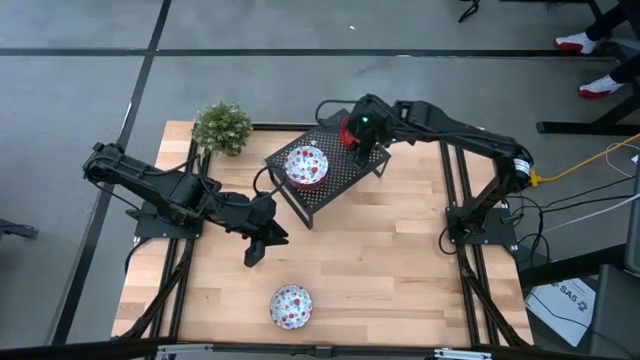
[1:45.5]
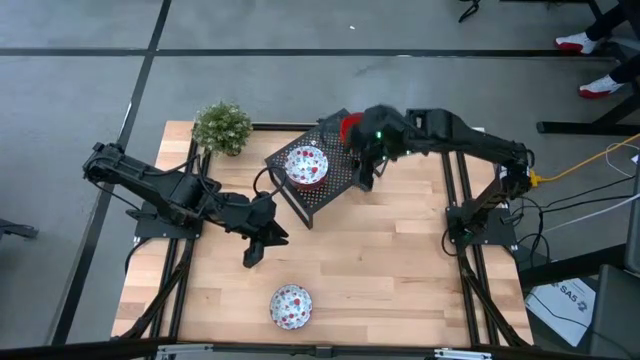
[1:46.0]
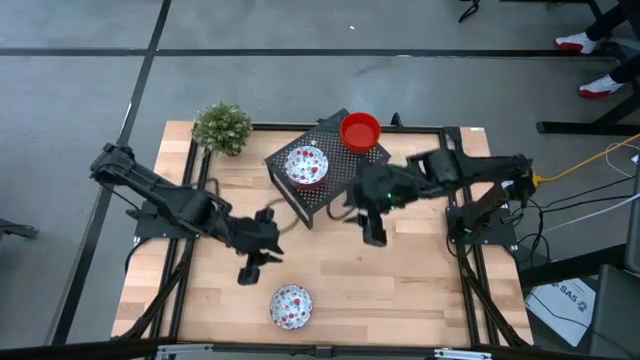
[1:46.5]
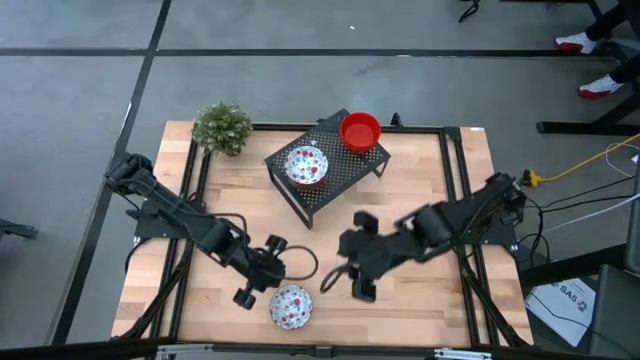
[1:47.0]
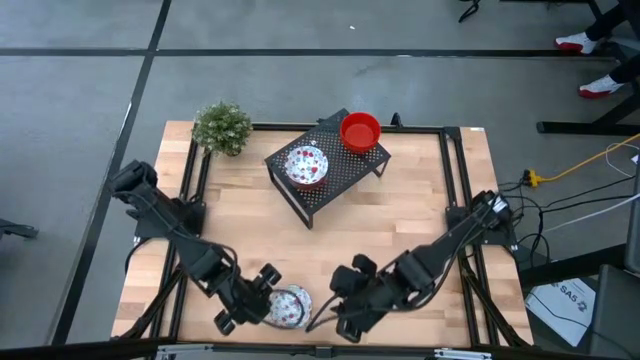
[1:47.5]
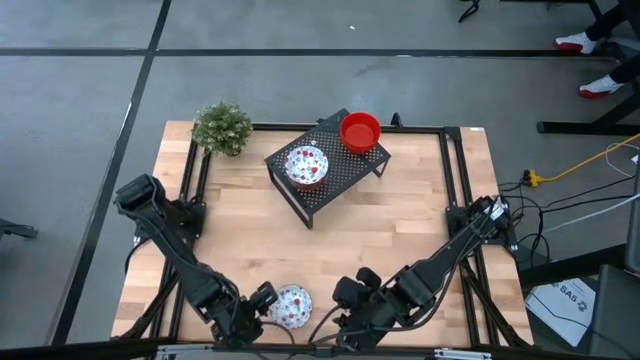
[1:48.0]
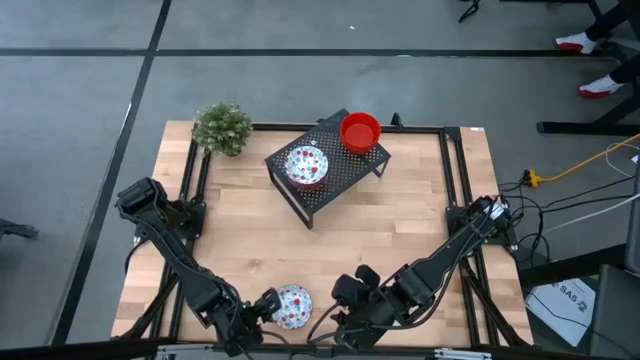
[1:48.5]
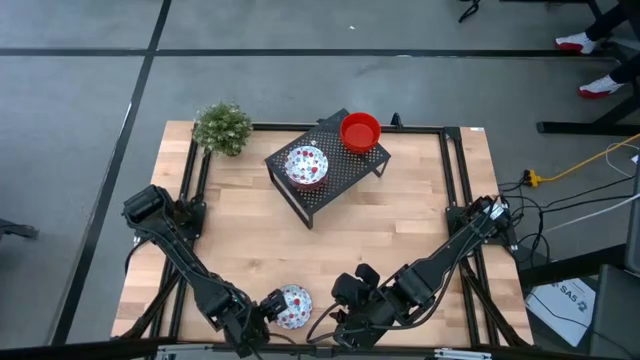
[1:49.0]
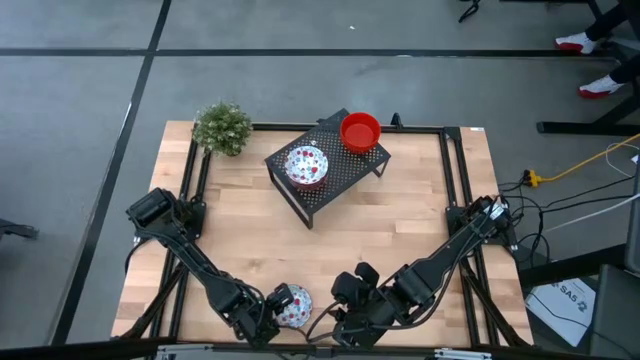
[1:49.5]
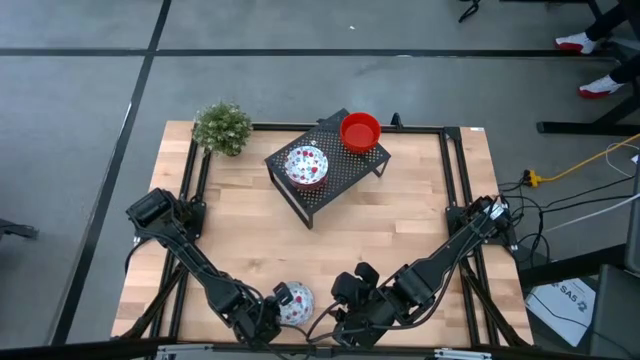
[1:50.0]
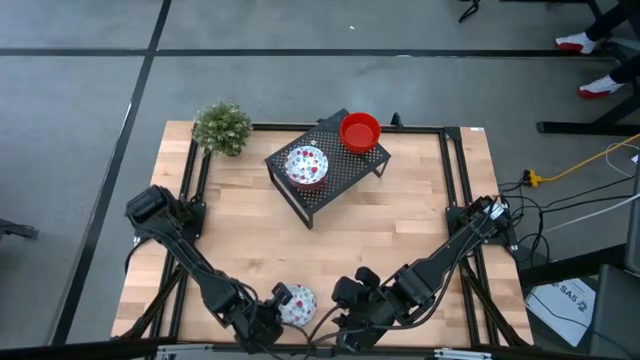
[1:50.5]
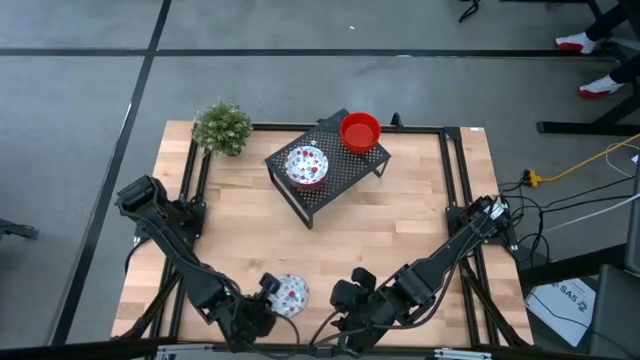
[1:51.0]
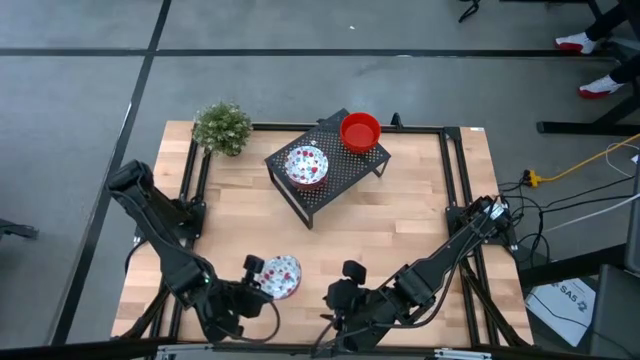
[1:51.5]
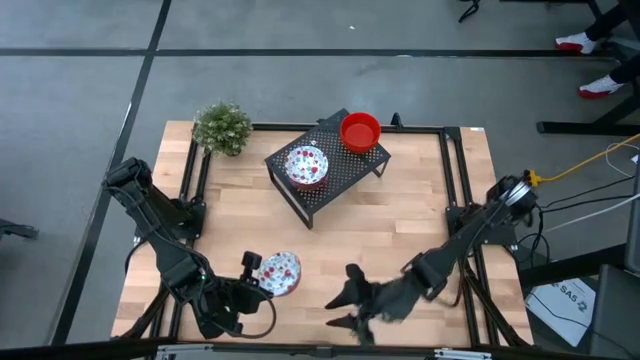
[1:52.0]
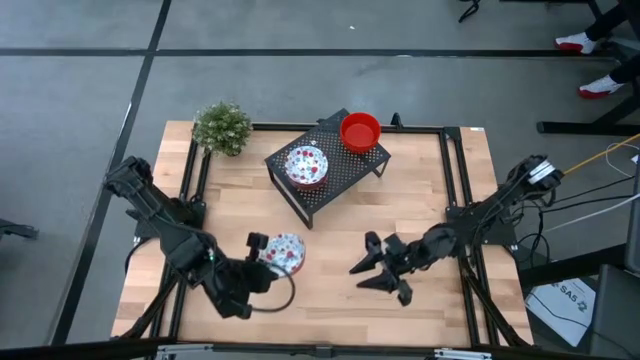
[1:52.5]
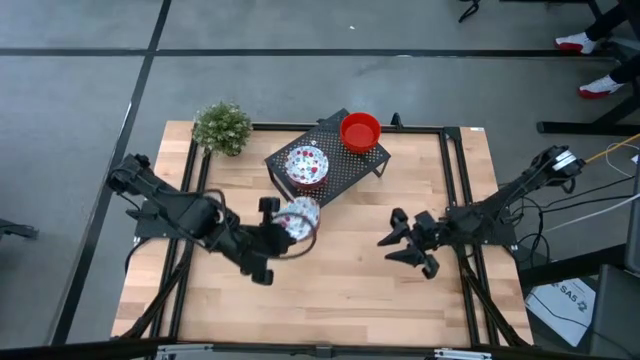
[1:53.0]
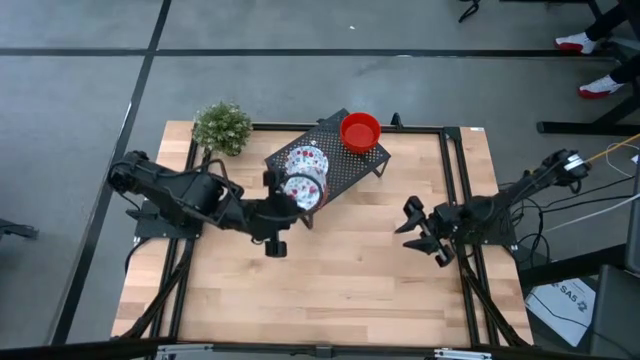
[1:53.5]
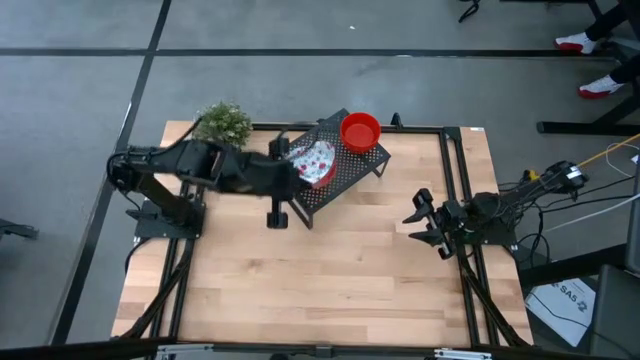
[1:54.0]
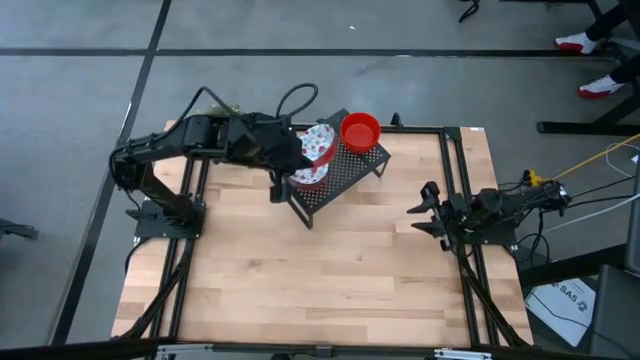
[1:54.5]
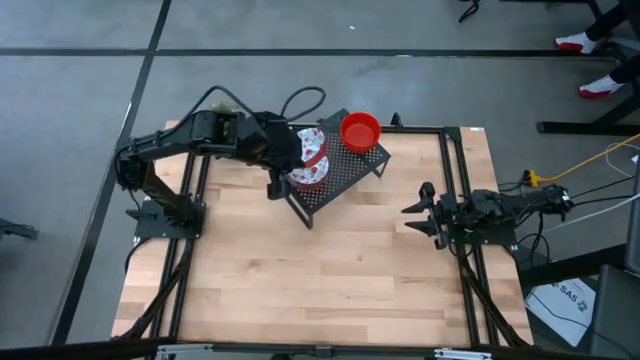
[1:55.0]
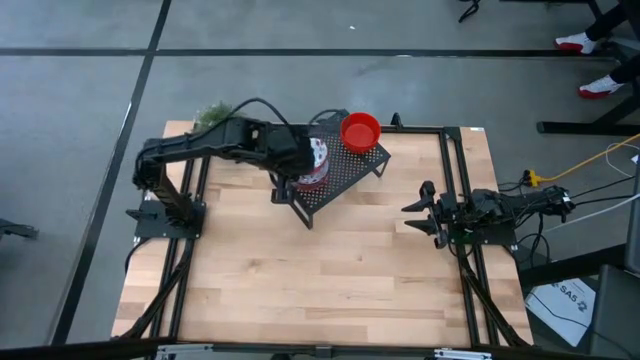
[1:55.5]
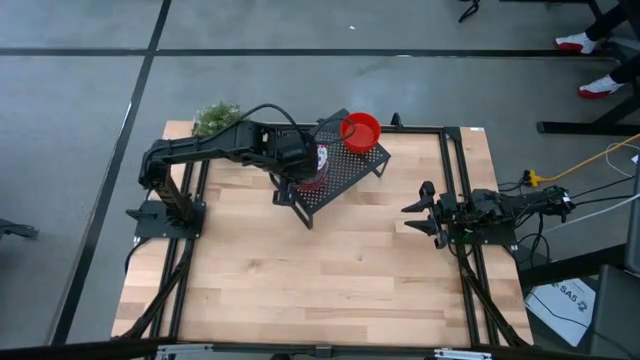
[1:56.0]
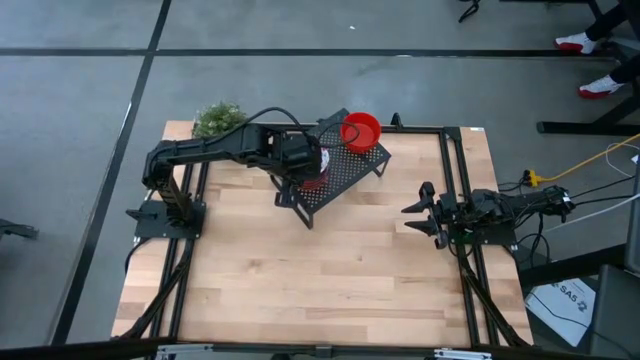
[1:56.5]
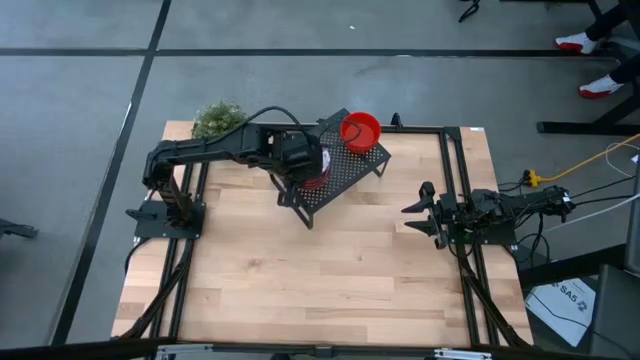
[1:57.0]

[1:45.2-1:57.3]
Task: Pick & Place Mini bowls
Stack the white patterned bowl on the white patterned bowl on the shelf

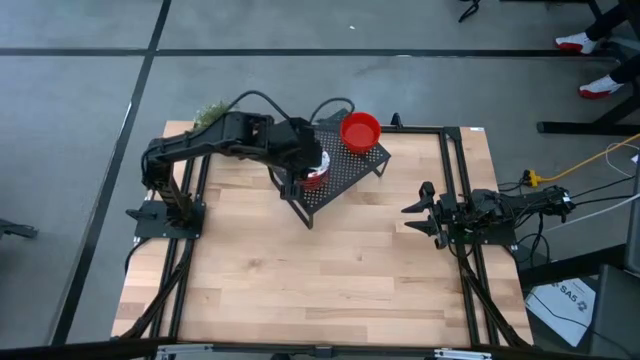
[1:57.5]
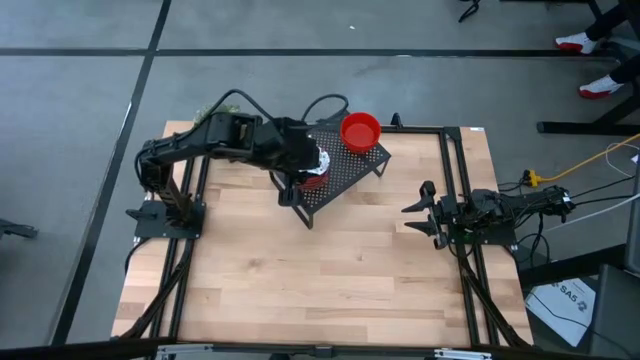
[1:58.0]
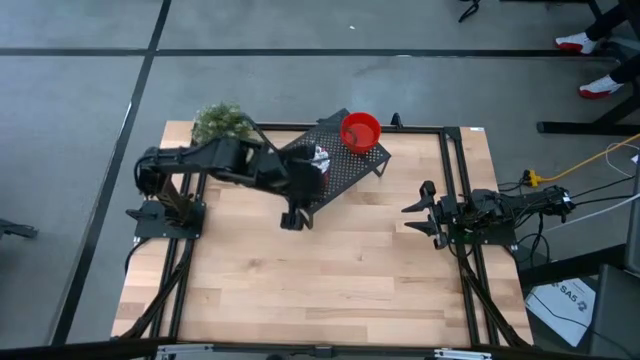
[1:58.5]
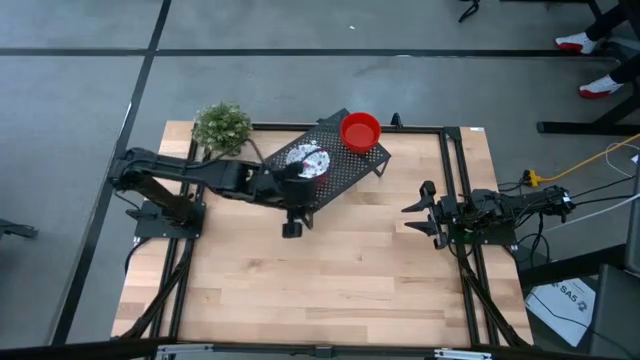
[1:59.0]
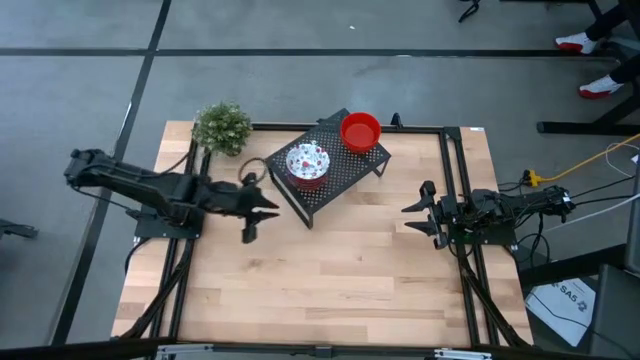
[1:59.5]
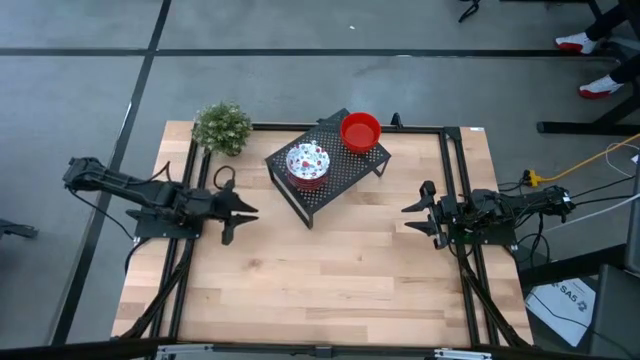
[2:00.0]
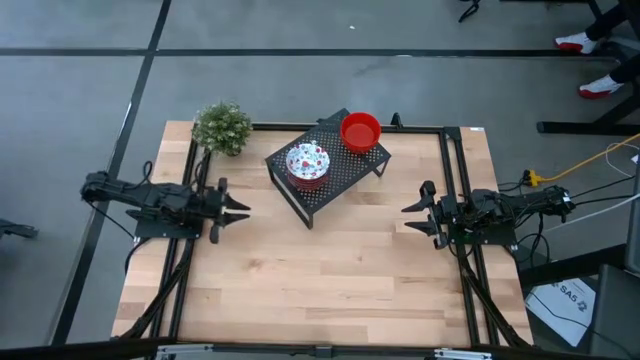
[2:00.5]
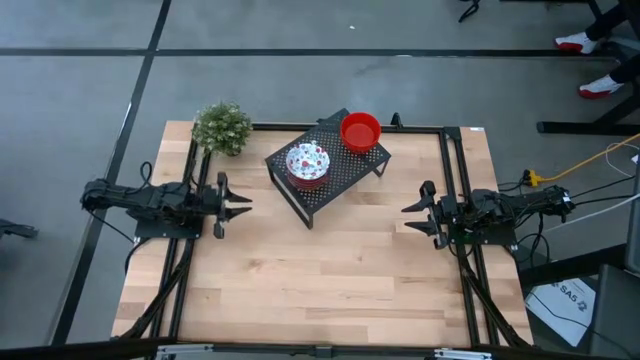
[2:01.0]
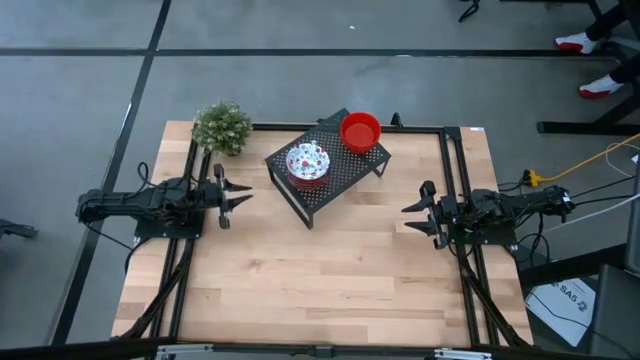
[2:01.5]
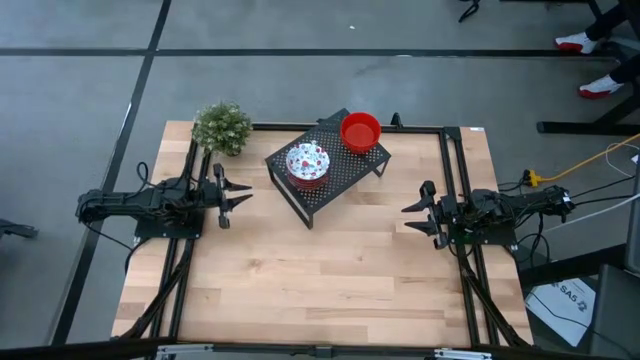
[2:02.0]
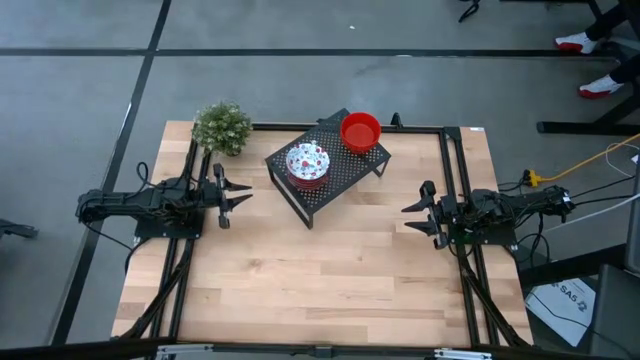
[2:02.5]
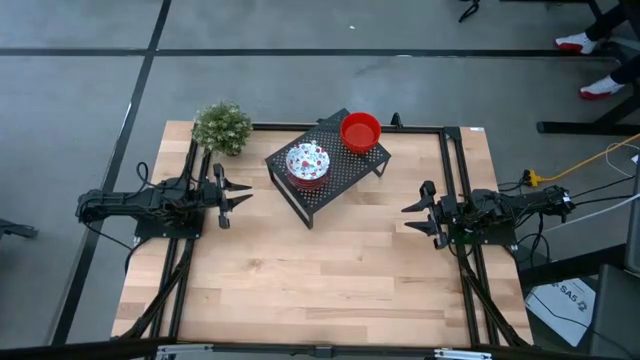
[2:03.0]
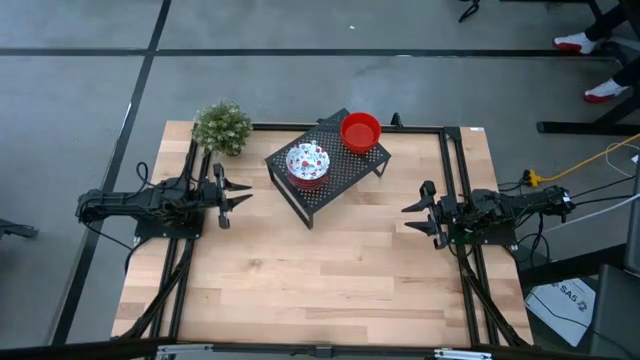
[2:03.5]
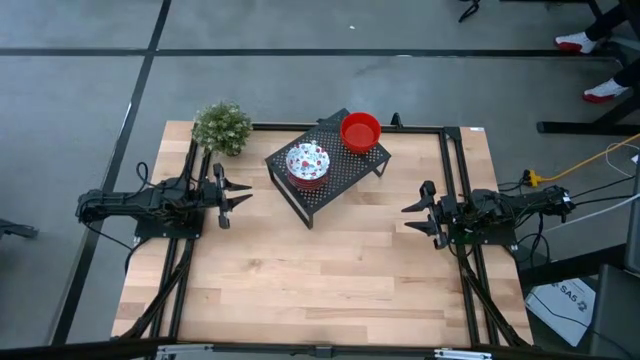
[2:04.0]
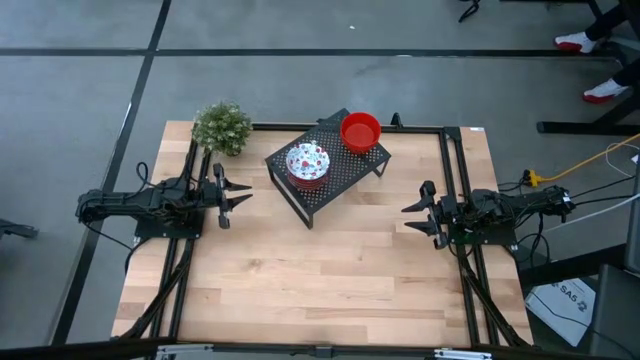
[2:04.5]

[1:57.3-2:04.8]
Return to Home Position

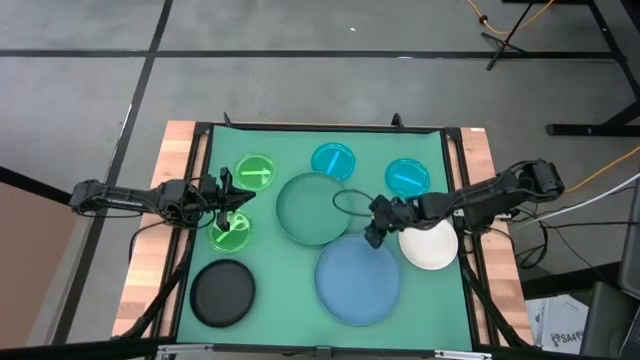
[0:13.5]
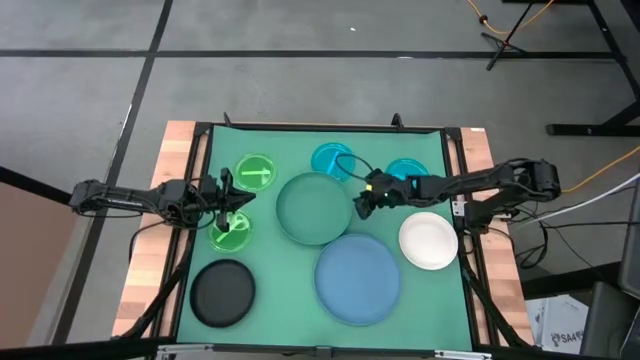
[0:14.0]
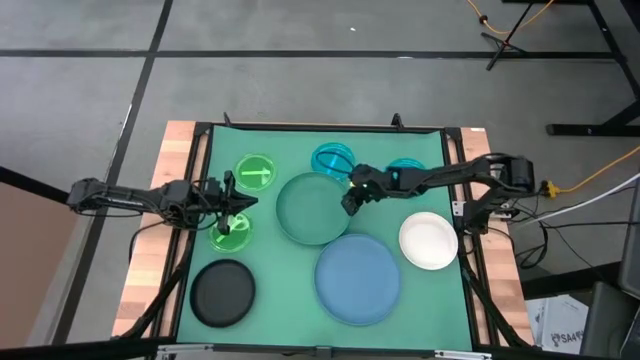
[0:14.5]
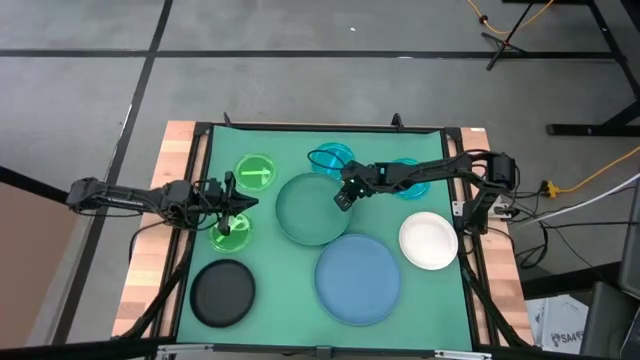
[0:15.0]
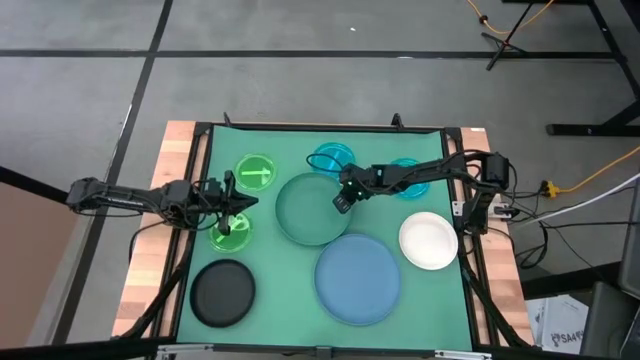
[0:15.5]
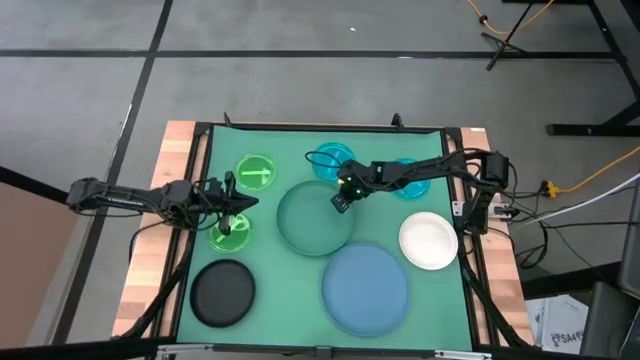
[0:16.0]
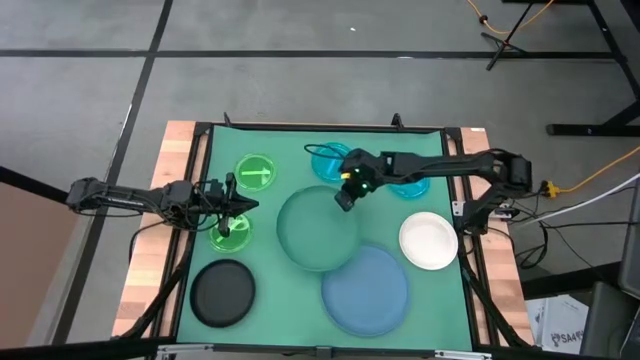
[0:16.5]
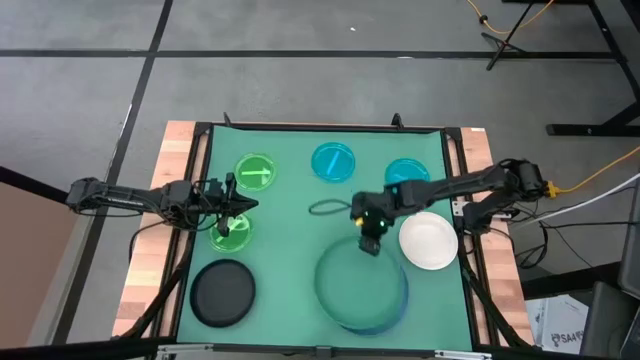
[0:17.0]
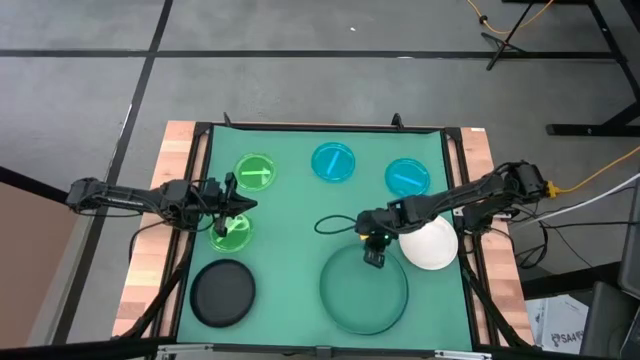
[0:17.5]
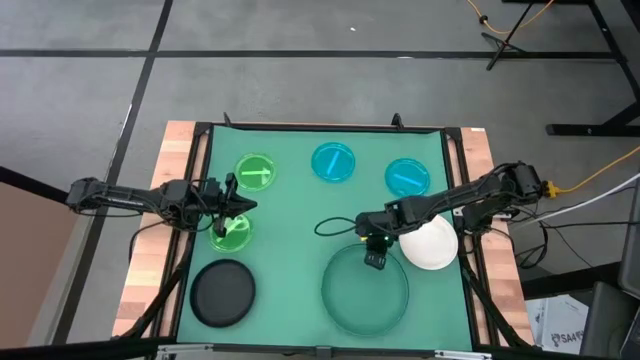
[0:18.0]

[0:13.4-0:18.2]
Task: Stack plastic plates
Stack the blue plate on the green plate
